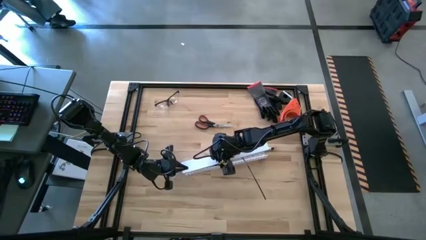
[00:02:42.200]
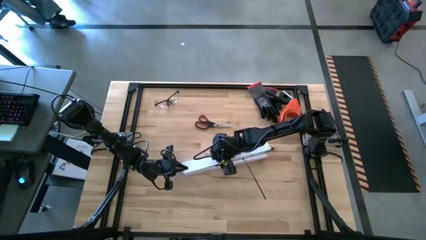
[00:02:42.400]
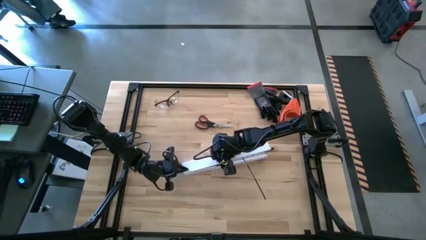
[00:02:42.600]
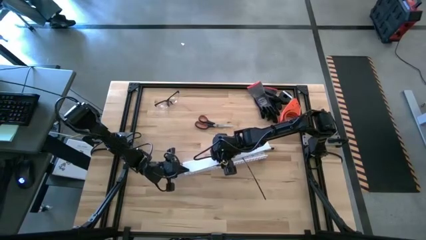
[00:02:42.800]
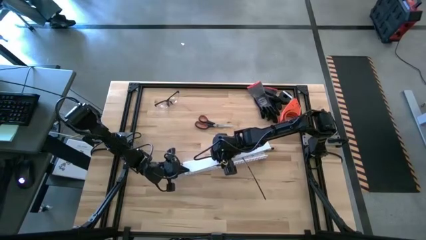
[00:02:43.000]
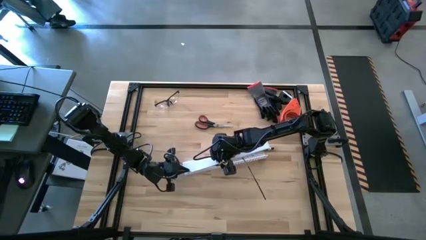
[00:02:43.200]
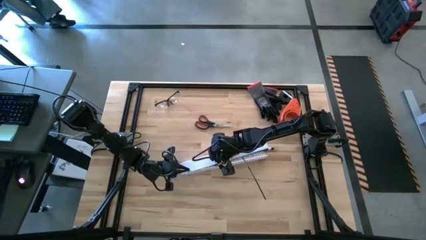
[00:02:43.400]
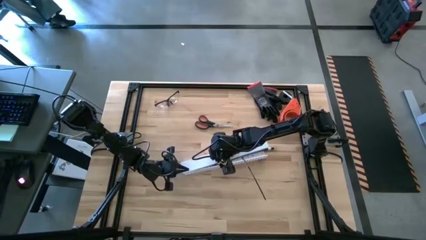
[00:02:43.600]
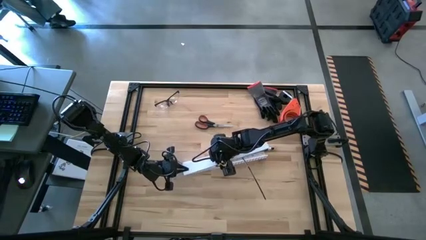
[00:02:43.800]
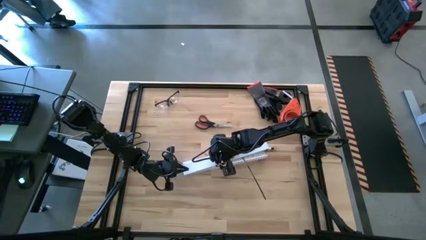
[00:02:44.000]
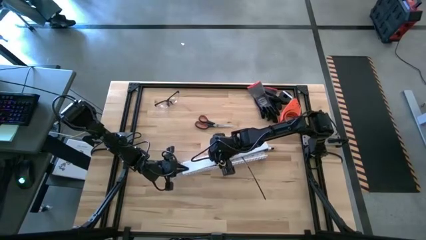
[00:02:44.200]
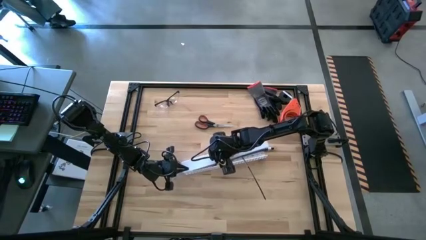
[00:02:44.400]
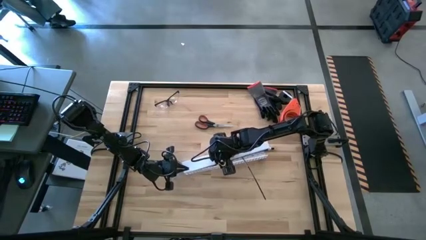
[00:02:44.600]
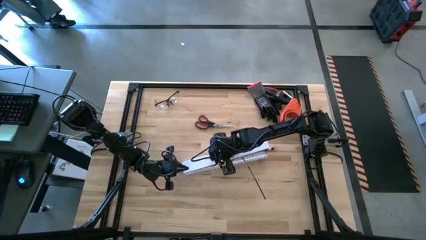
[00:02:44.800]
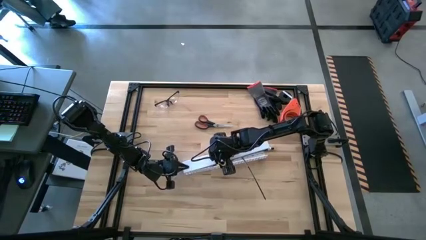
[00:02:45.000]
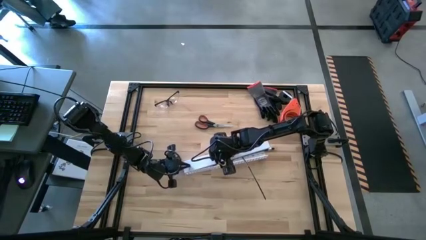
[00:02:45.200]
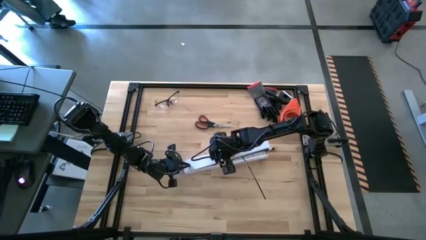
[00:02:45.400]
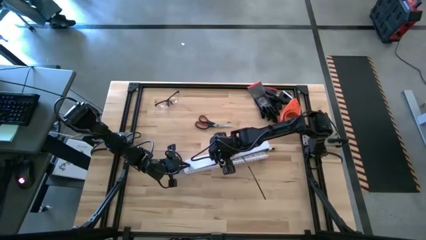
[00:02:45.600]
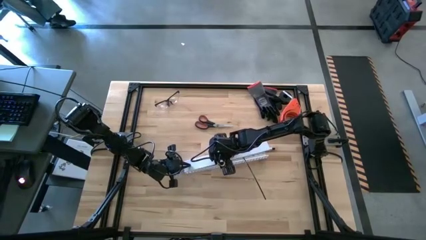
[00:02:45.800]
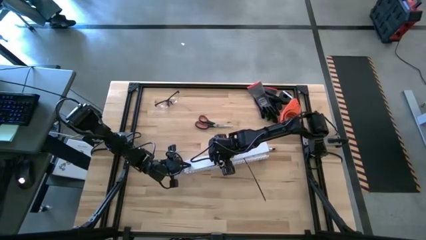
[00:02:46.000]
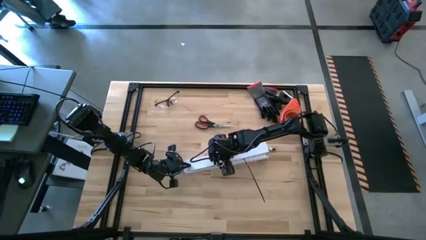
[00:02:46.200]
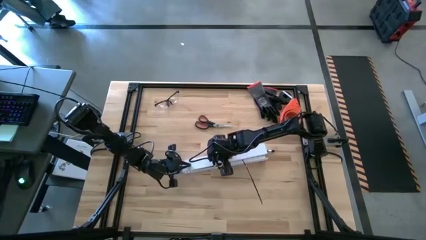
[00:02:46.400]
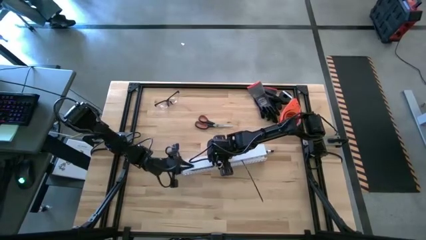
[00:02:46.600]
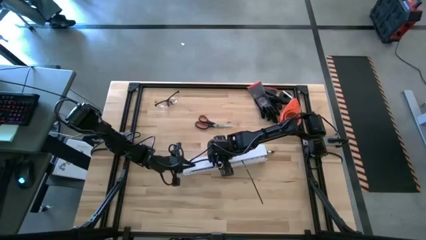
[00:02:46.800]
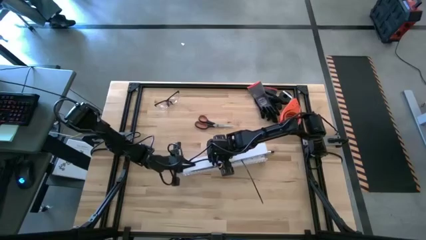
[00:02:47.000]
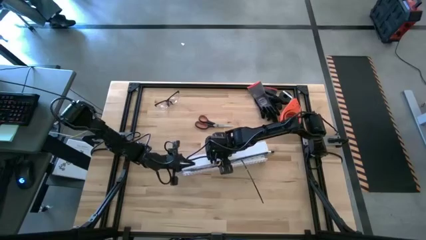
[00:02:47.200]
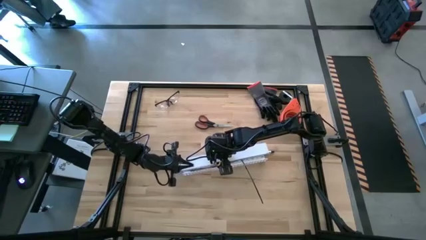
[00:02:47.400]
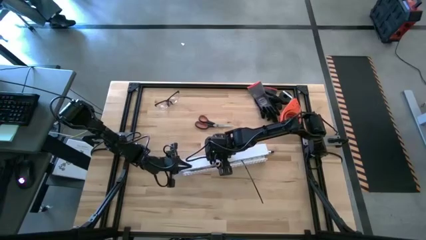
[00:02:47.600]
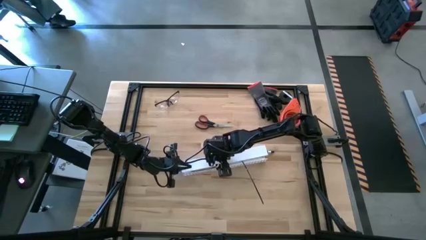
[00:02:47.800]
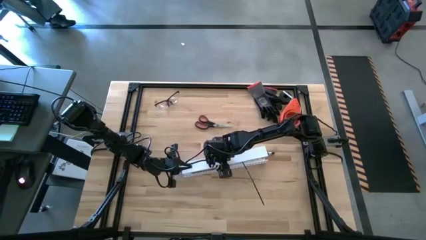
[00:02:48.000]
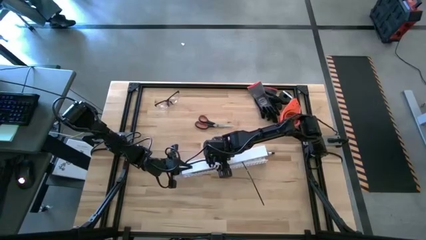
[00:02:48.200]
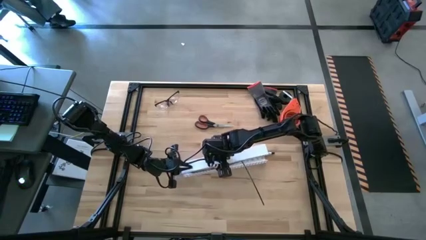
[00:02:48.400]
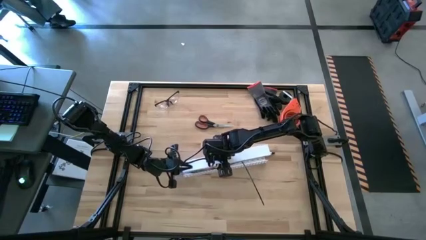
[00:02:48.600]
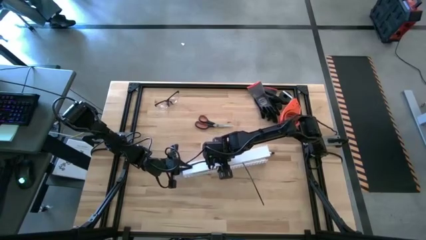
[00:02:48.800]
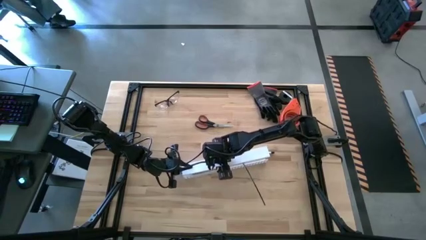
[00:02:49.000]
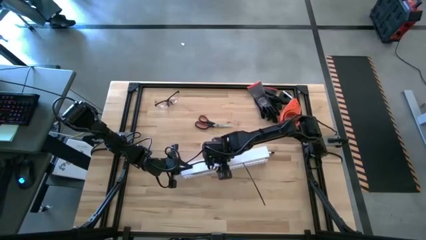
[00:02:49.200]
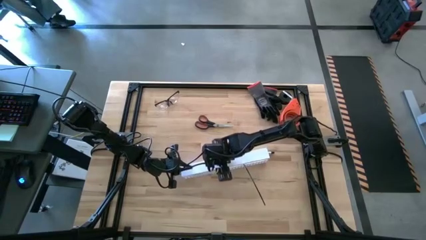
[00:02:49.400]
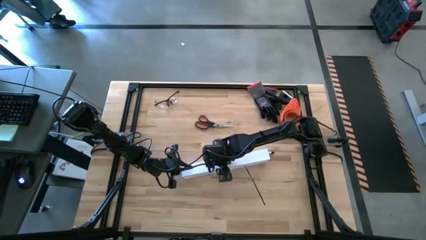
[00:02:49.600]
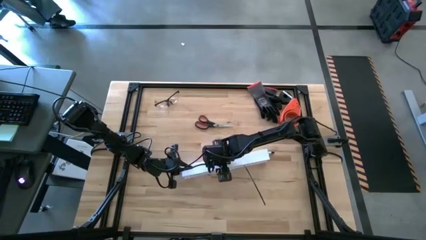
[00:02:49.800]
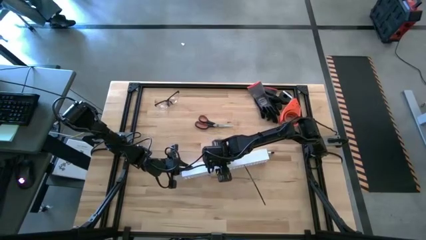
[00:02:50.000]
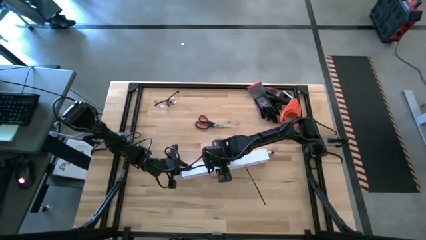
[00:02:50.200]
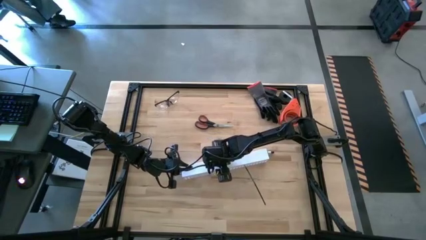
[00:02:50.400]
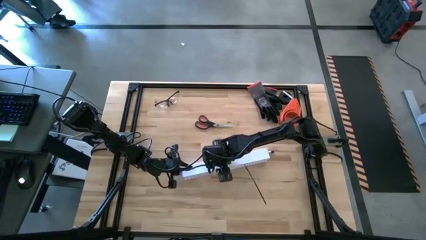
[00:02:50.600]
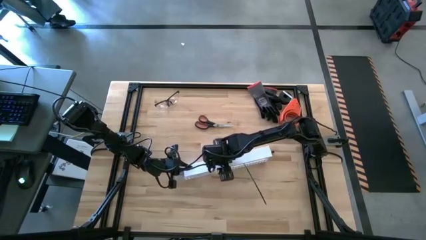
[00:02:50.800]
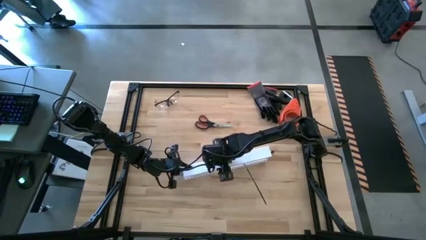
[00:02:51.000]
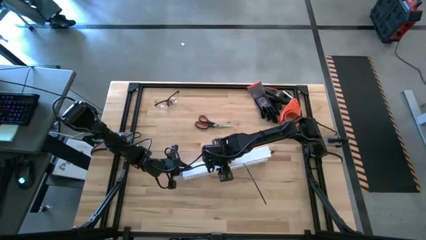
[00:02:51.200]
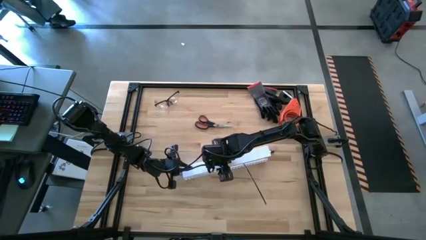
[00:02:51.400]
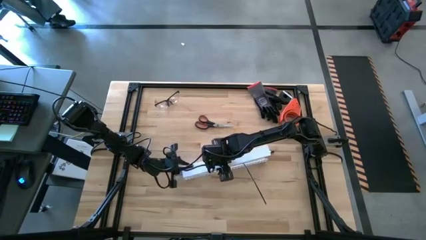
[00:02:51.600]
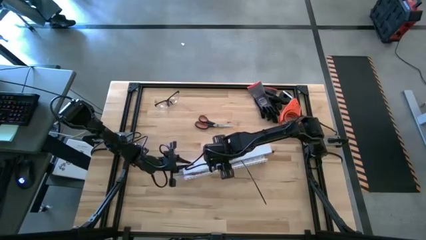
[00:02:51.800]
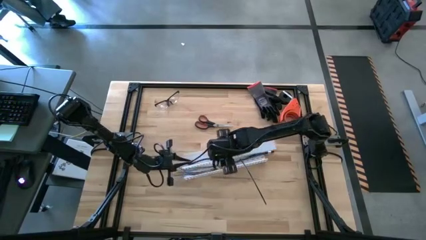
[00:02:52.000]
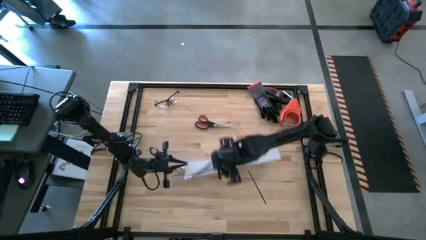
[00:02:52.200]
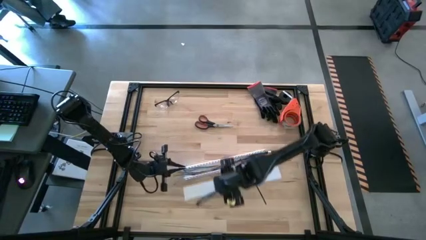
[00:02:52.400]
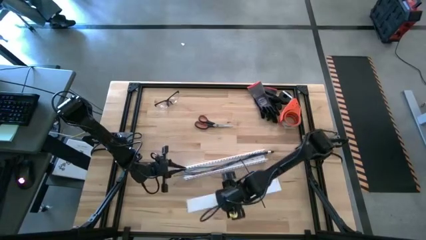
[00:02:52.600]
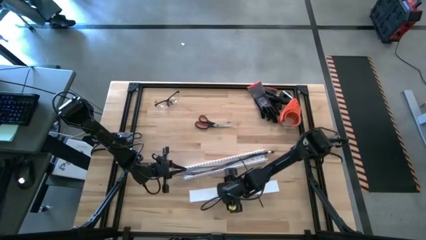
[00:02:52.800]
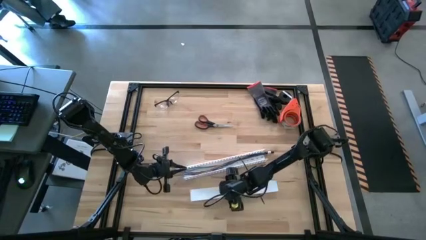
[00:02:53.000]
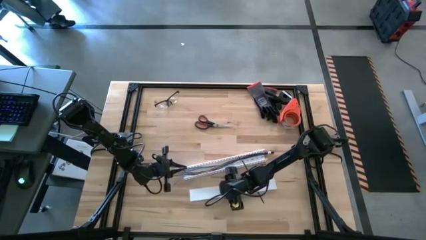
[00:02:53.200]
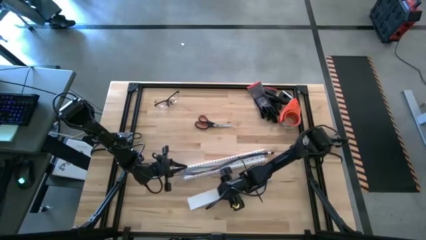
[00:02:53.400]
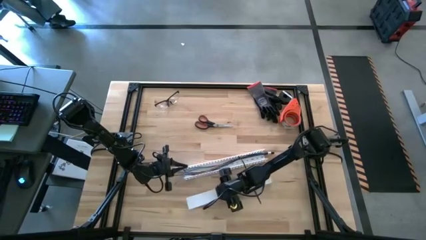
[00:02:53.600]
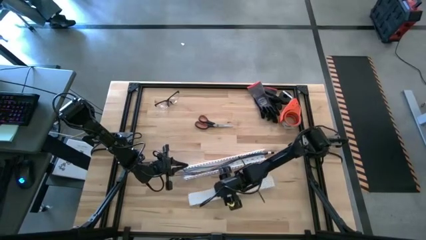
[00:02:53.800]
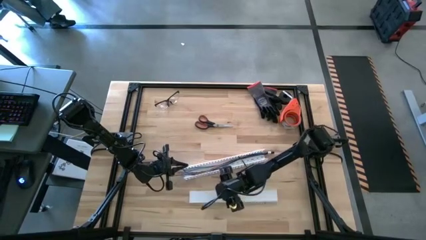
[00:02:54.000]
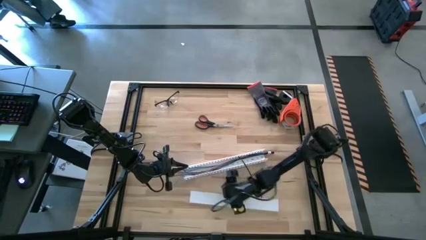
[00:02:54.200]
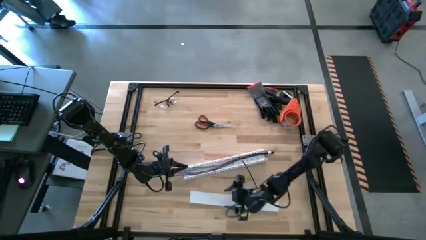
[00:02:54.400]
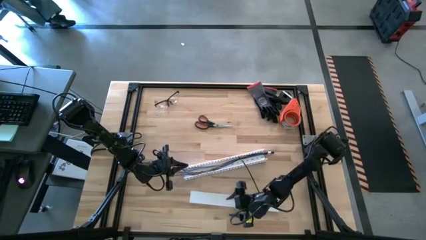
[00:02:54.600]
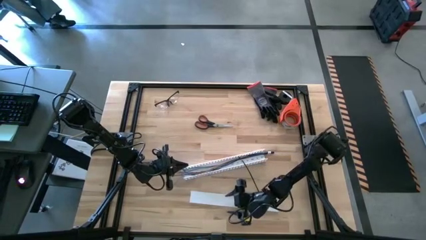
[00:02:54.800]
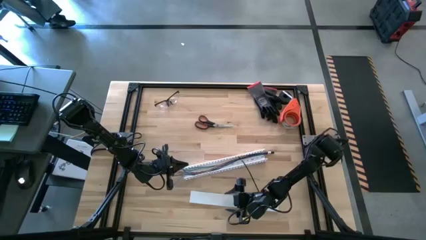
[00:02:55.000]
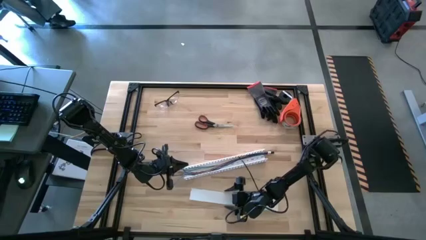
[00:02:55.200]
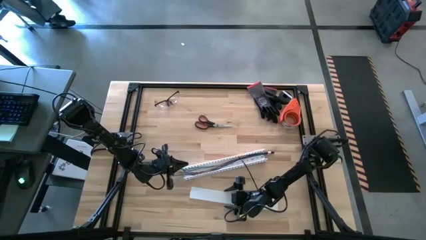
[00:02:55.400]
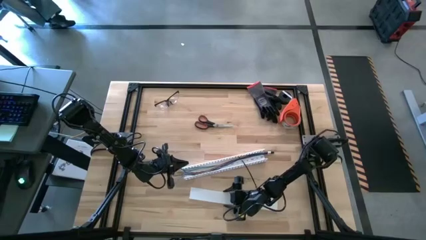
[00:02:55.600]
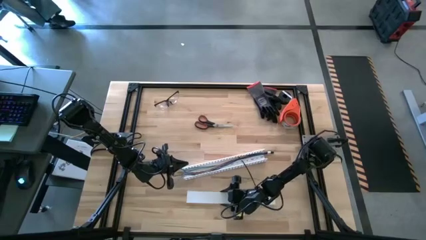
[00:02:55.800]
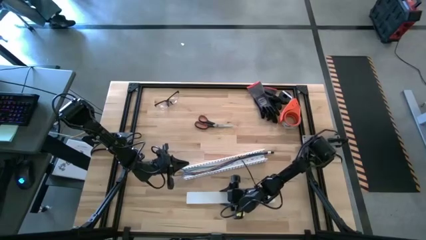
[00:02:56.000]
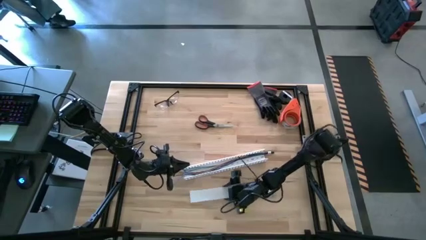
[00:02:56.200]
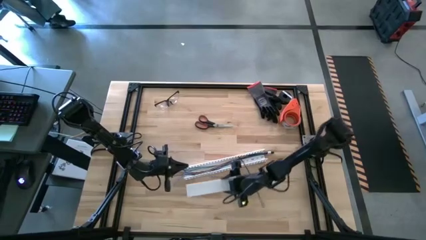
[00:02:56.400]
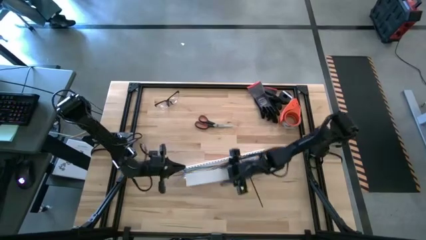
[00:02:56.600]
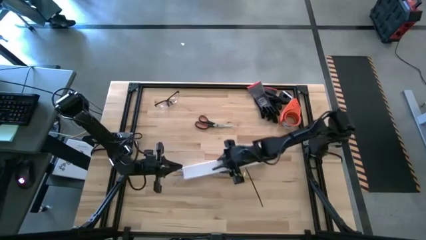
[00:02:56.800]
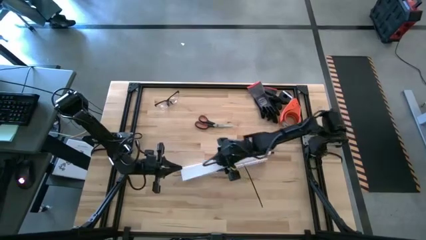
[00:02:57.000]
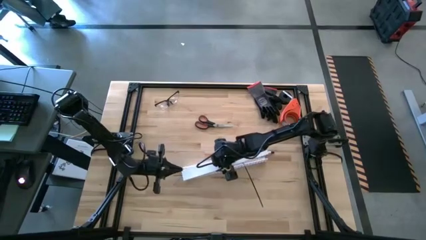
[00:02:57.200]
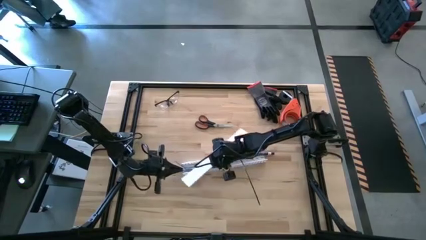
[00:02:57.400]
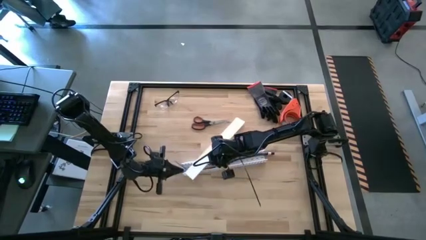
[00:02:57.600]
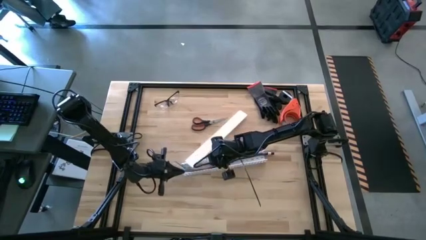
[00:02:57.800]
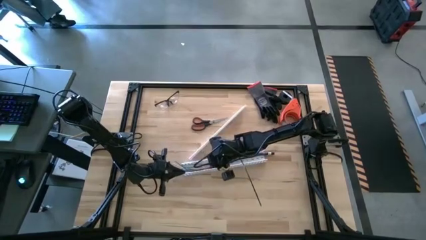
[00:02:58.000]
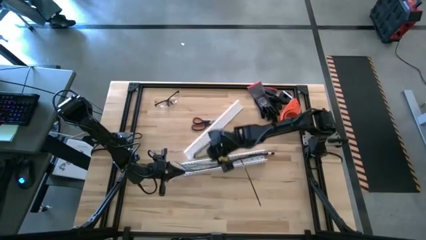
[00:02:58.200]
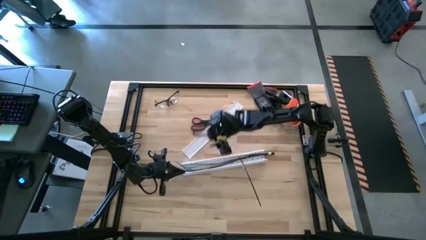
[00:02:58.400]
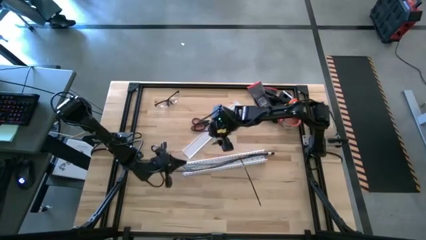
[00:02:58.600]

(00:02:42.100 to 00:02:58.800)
Task: Ziptie cables
Close the white cable duct lid
